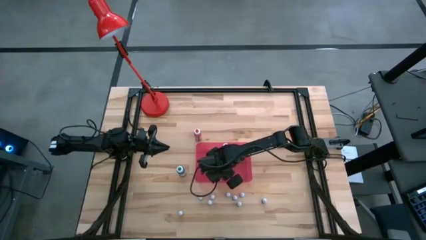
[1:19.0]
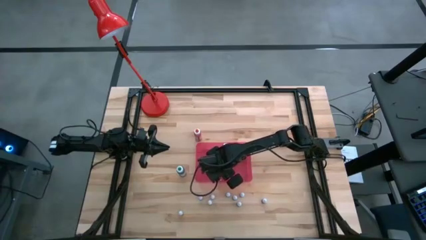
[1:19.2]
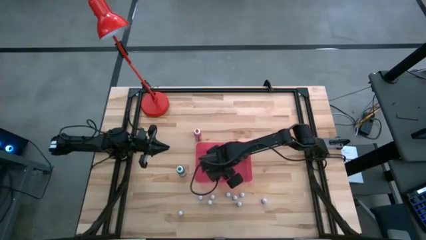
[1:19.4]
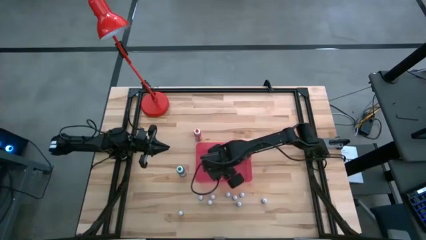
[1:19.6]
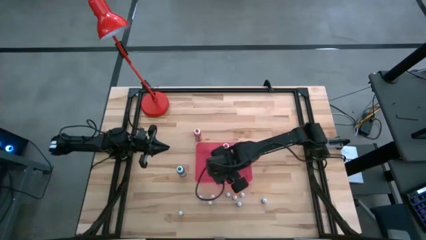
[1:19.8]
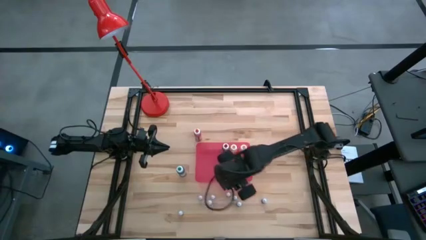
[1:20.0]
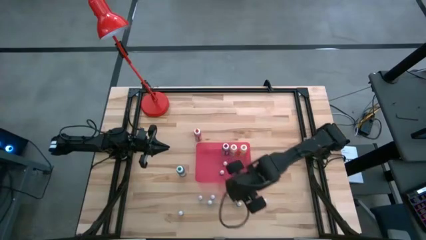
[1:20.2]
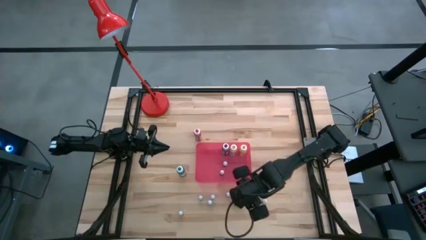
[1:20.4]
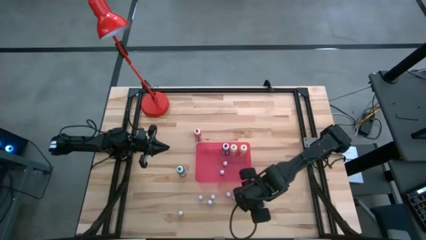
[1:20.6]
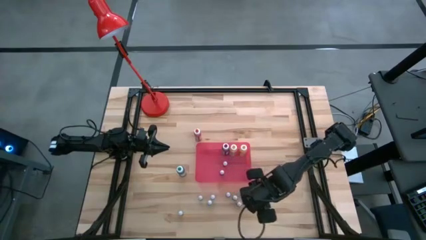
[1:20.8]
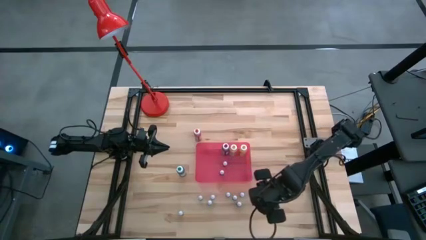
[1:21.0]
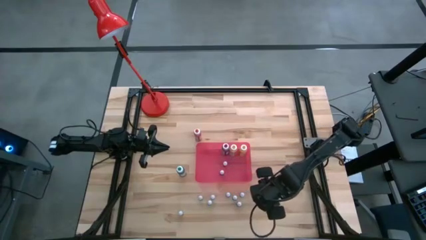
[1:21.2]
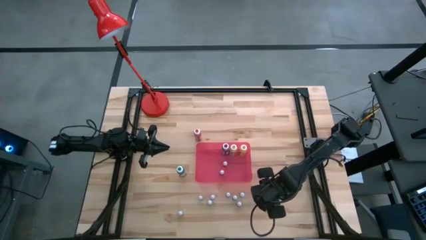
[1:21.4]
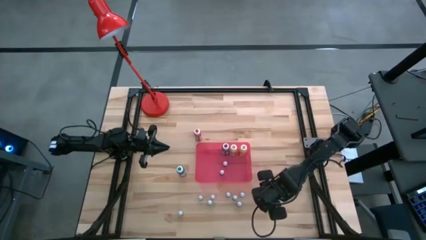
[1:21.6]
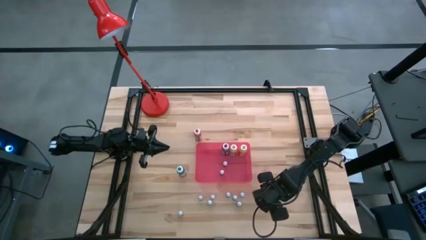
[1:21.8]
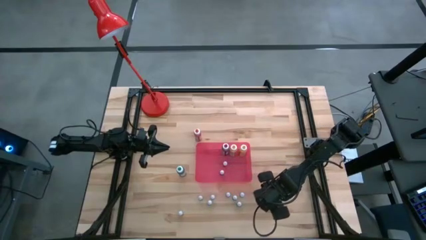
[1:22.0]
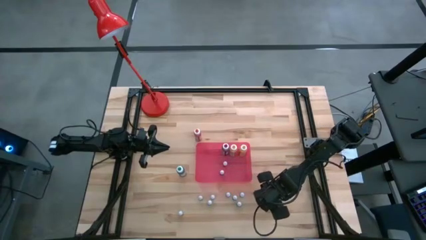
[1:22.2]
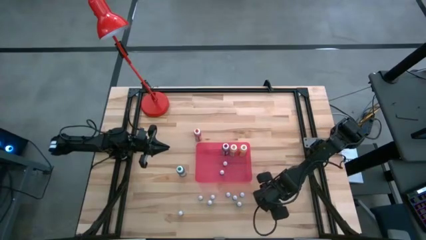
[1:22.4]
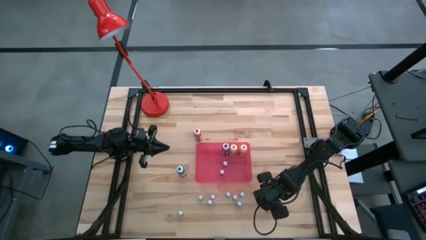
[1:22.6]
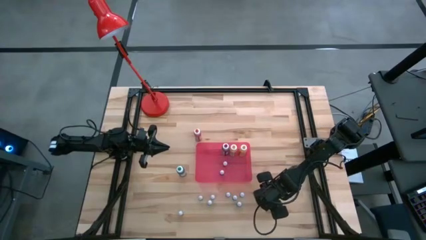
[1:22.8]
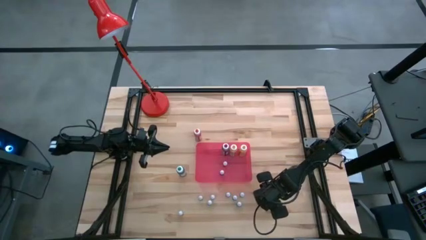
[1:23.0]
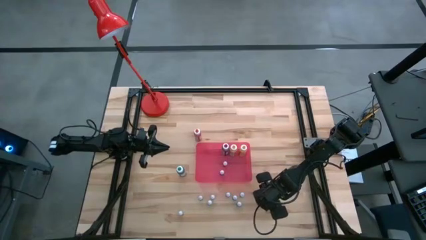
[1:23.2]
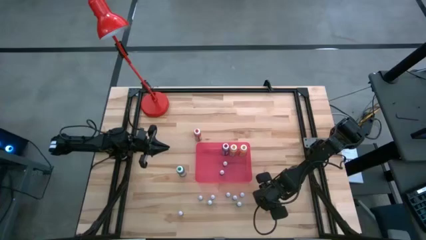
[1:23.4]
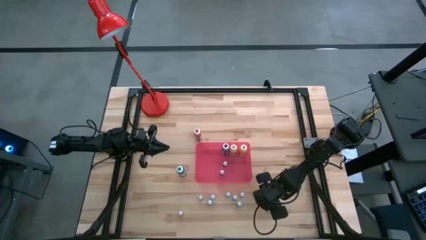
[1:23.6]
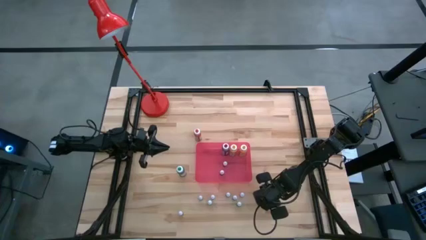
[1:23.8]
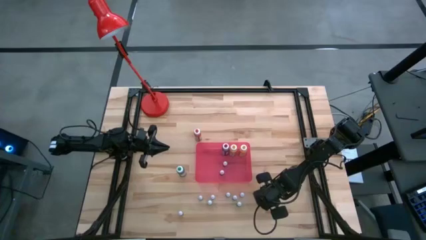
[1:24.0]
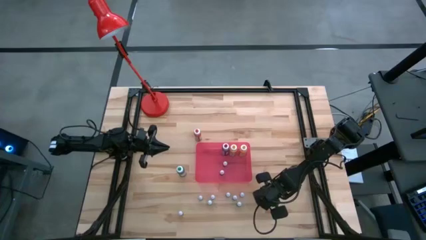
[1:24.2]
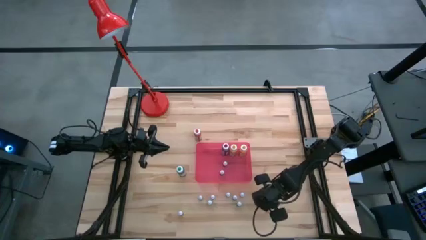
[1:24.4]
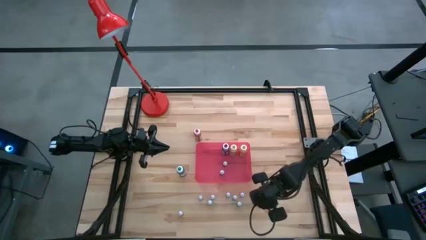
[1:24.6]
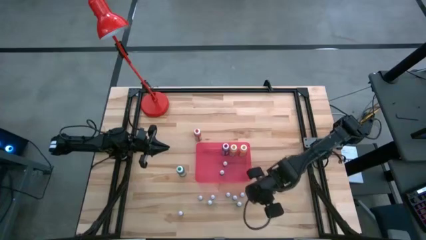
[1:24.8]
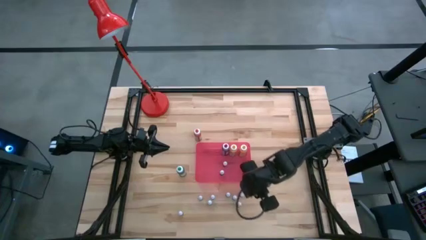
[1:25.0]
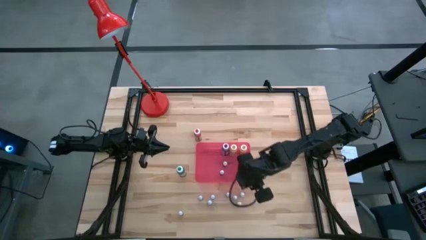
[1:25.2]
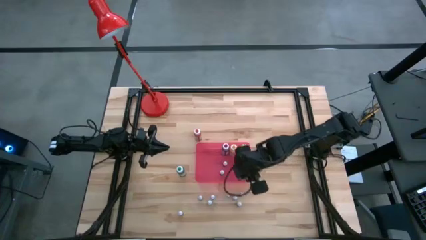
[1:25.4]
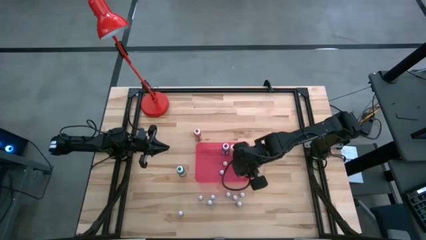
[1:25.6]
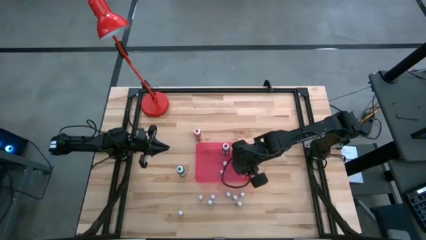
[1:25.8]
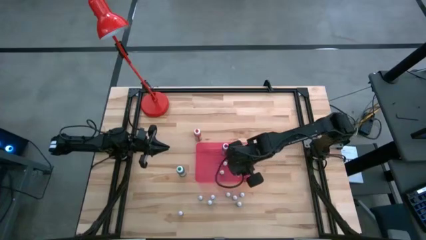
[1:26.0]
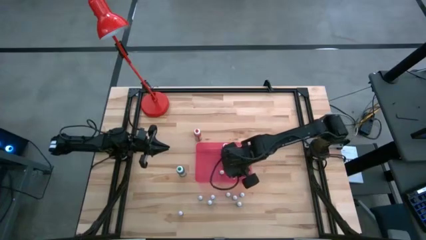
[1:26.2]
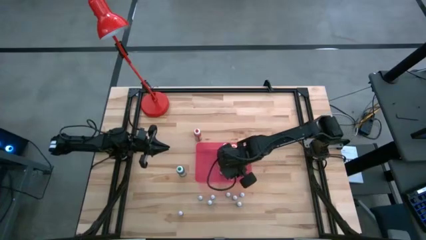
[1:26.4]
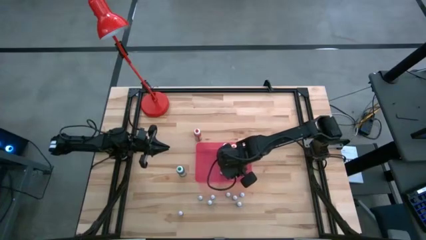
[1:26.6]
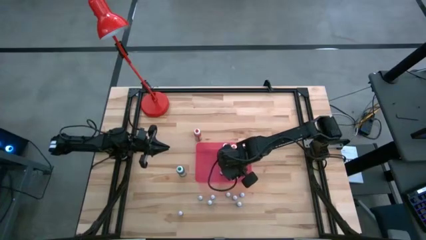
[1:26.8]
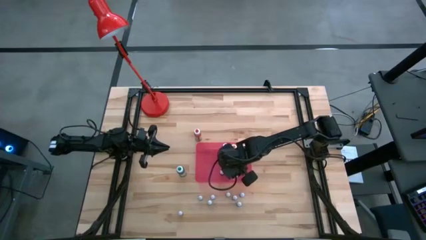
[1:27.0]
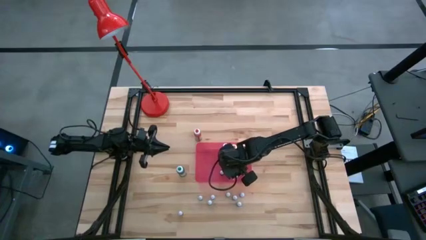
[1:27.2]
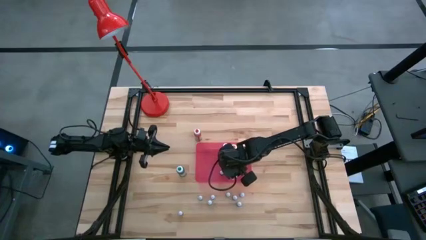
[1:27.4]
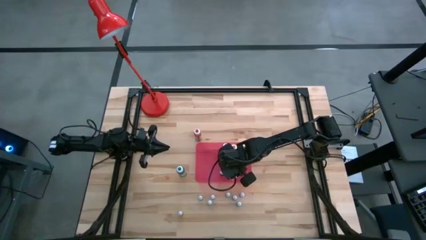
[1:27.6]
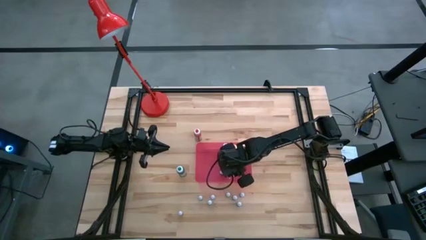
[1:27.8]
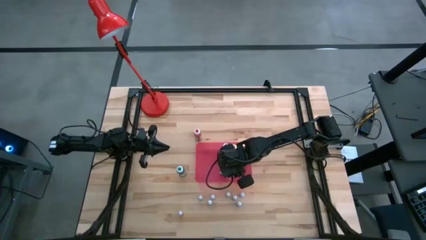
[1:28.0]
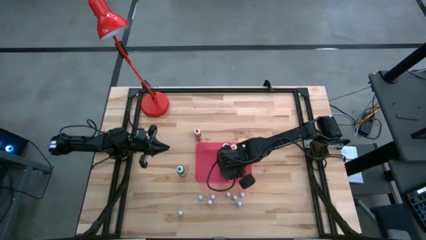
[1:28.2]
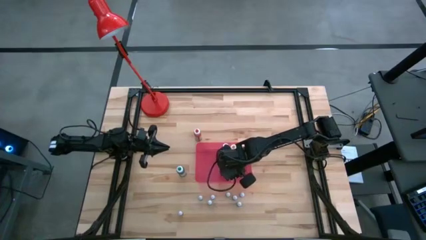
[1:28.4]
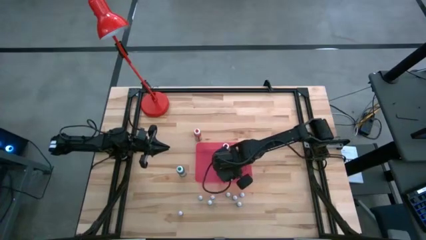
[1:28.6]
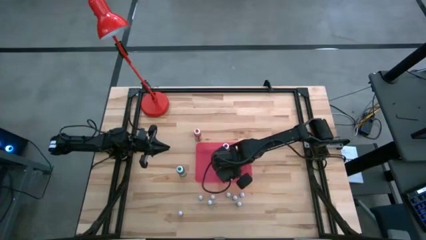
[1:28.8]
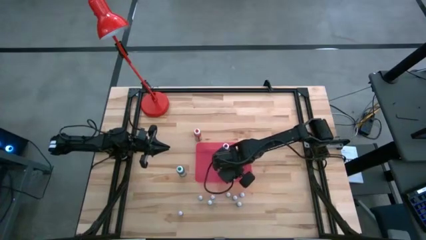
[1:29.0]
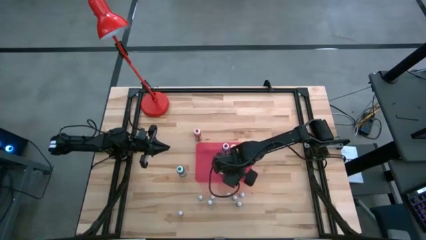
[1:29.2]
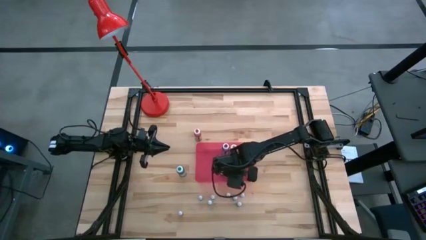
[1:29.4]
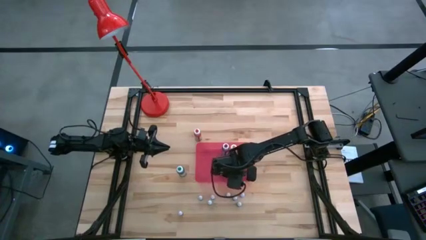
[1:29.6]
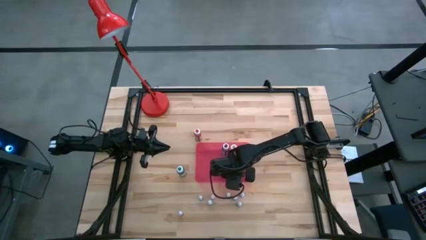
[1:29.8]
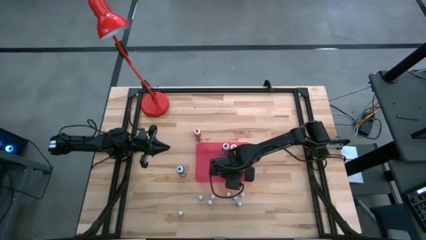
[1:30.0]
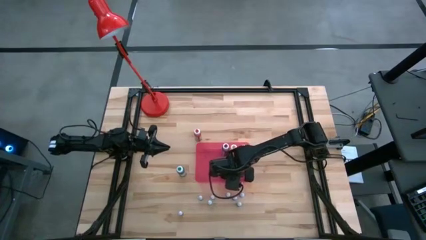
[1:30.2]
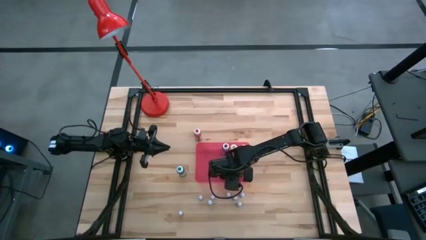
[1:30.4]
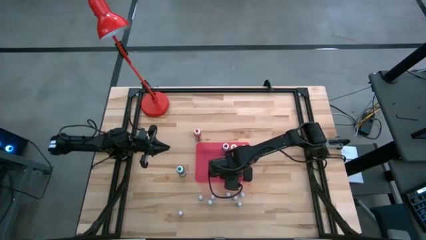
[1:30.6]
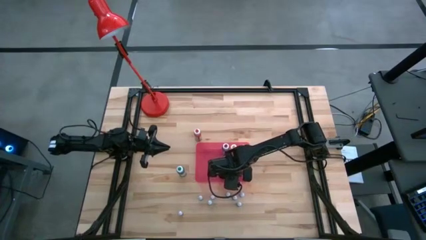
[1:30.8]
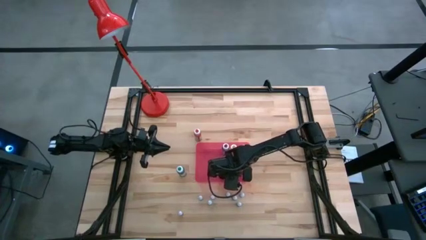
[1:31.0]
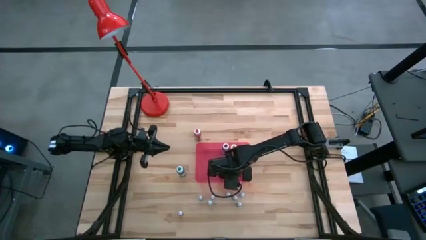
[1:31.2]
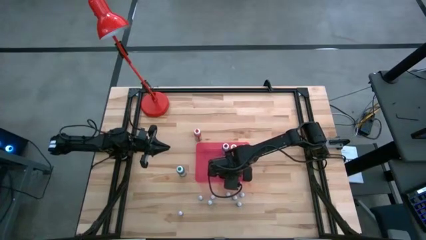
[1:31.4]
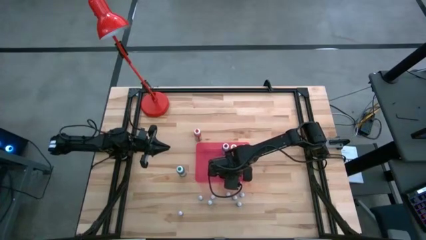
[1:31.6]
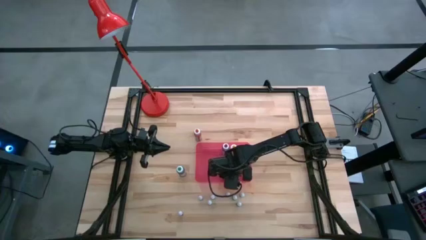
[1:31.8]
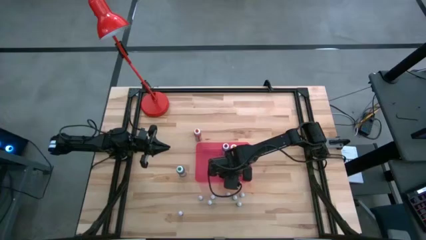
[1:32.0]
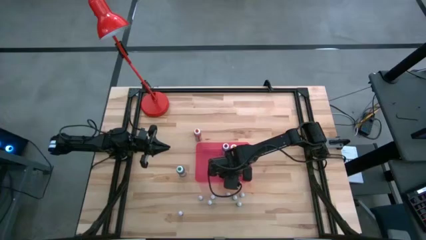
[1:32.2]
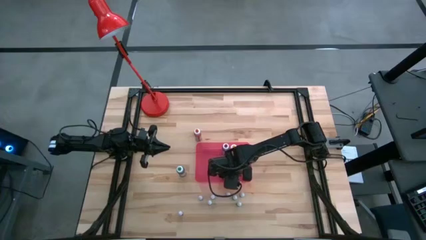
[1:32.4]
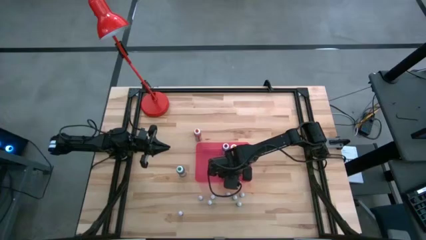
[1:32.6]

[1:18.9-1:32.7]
Task: Pick & Place food coloring
Put the right small red food coloring bottle into the container

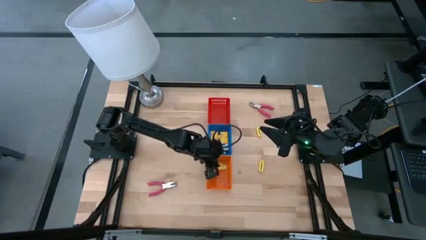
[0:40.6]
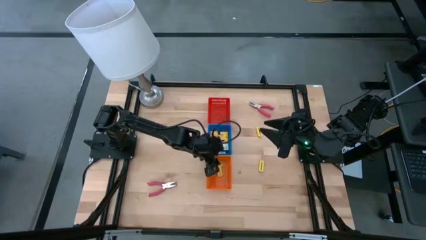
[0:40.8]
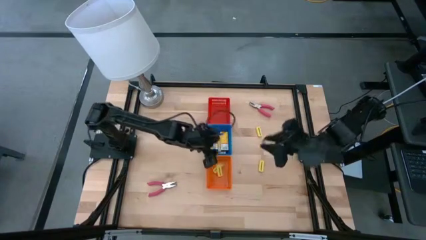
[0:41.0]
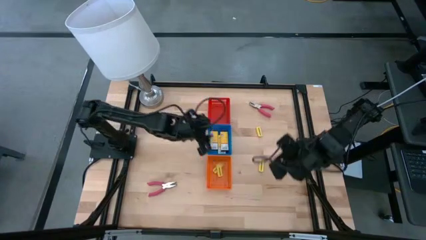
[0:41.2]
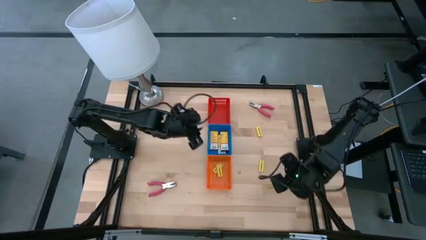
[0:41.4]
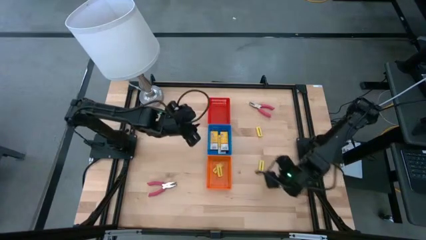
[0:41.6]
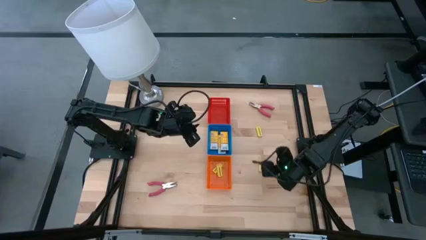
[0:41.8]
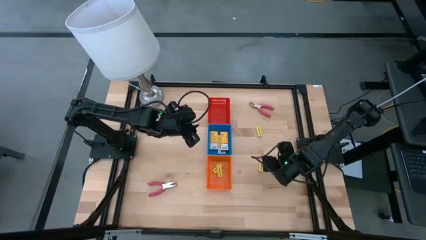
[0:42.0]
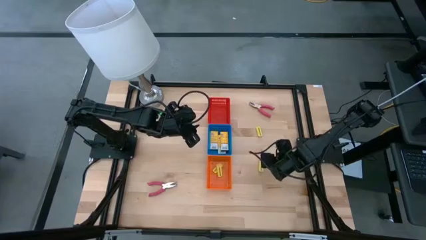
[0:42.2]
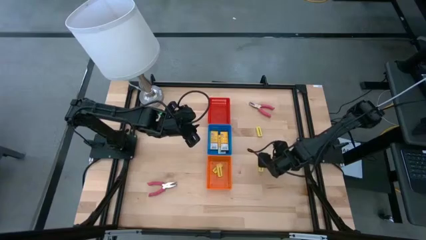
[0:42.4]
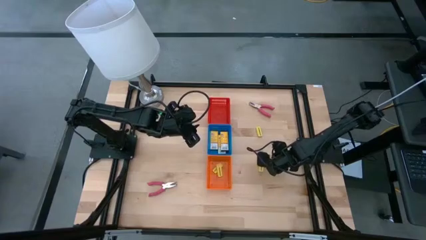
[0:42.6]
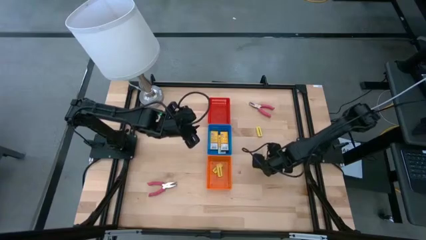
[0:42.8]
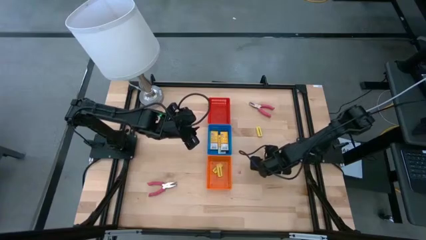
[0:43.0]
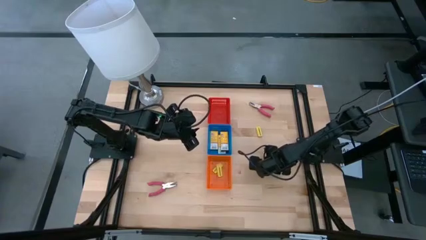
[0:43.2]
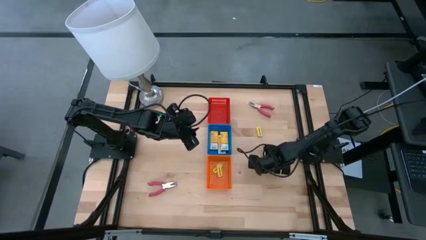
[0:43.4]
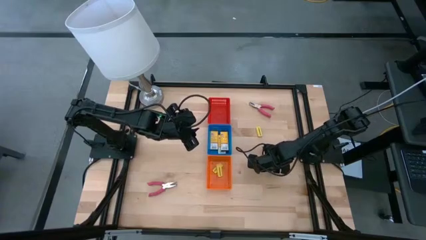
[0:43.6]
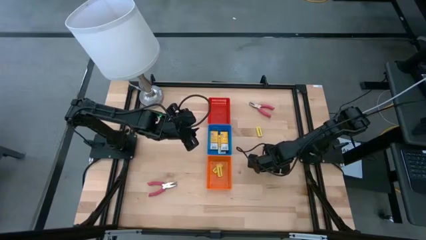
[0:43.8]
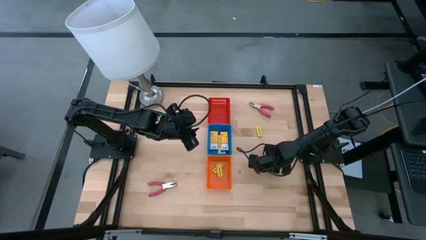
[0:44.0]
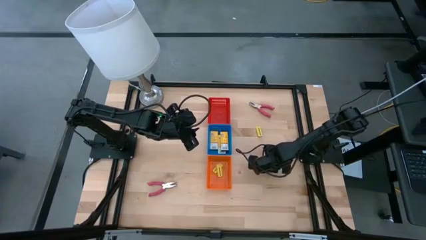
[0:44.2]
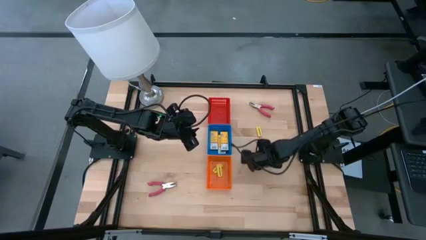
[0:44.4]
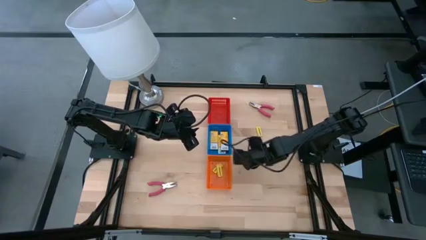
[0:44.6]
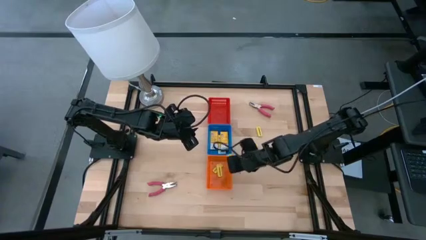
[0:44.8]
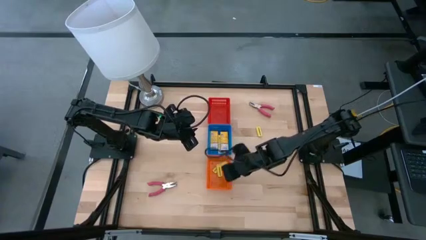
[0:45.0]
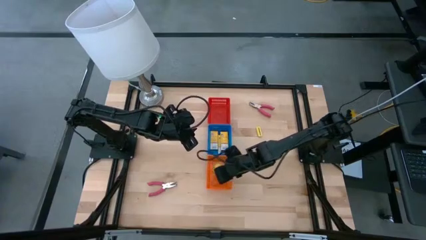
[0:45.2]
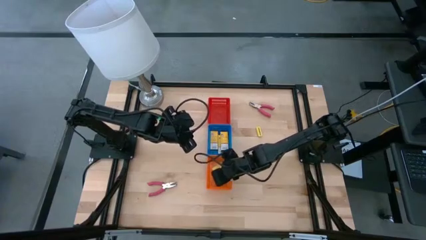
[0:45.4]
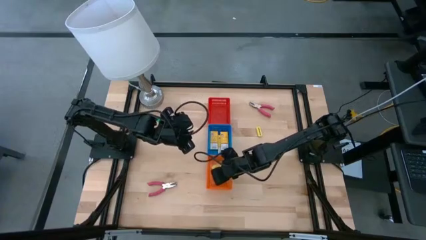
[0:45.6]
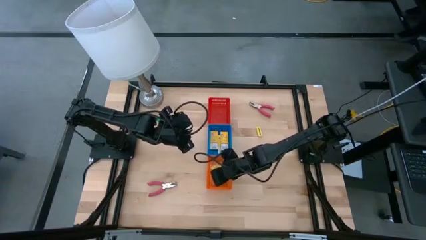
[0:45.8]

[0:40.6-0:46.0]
Task: Pick & Place School Supplies
Put the yellow eraser into the orange bin
